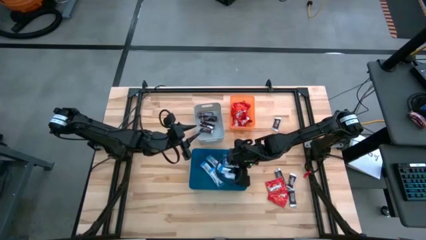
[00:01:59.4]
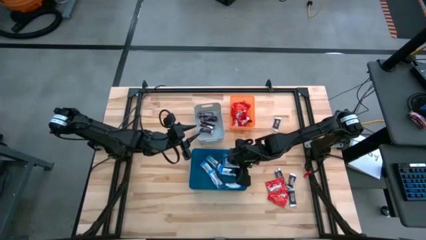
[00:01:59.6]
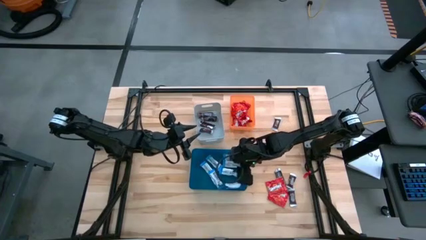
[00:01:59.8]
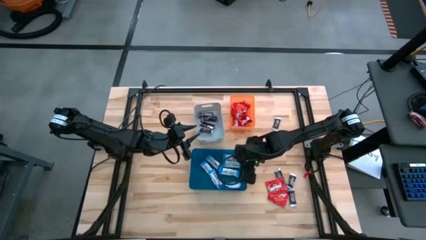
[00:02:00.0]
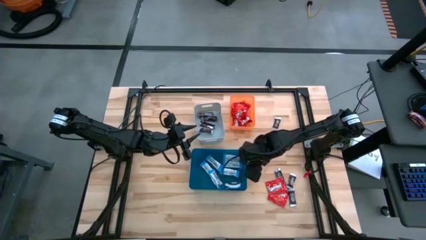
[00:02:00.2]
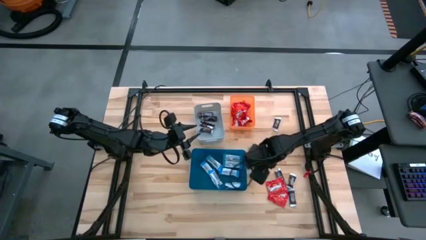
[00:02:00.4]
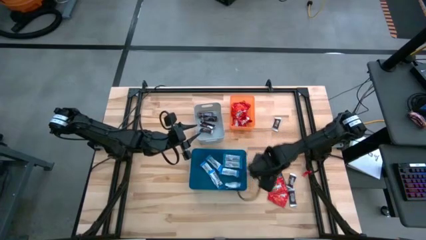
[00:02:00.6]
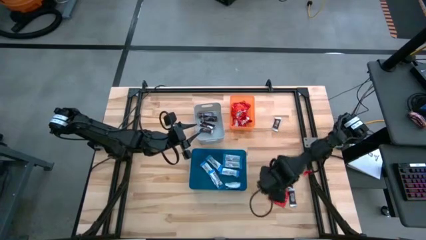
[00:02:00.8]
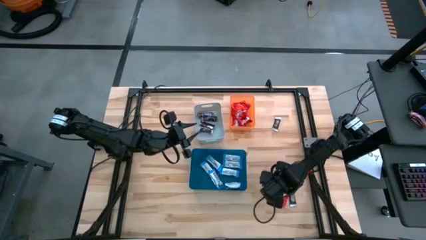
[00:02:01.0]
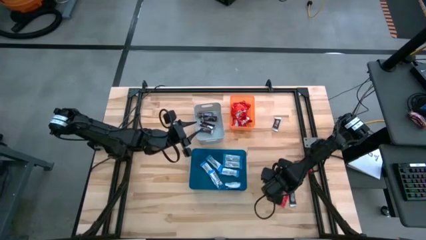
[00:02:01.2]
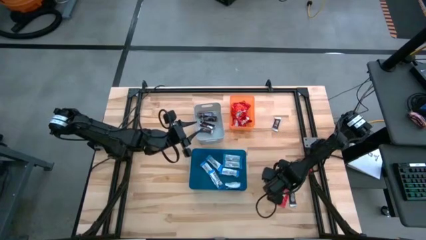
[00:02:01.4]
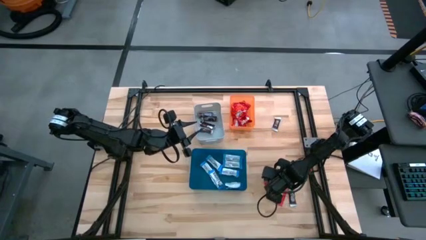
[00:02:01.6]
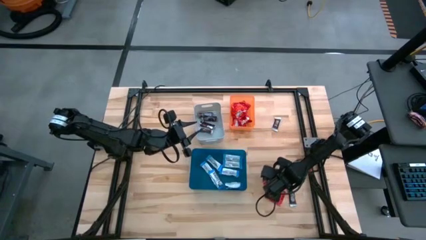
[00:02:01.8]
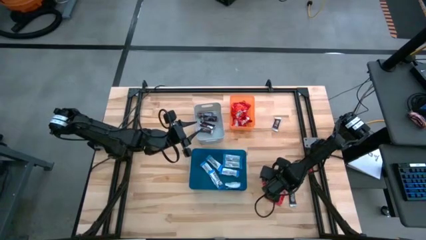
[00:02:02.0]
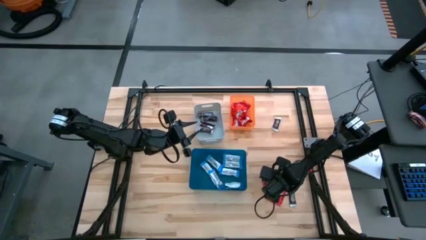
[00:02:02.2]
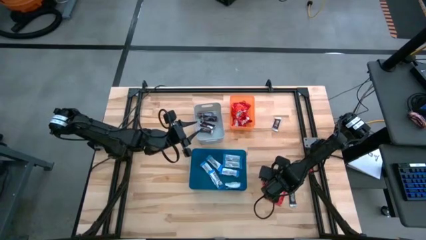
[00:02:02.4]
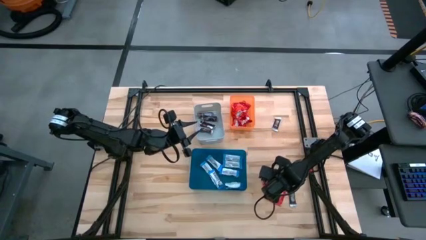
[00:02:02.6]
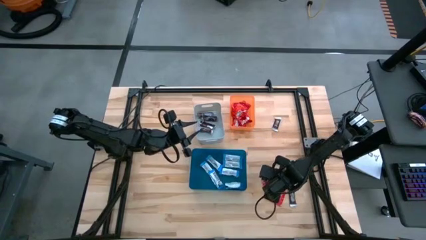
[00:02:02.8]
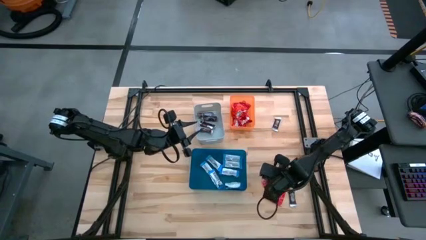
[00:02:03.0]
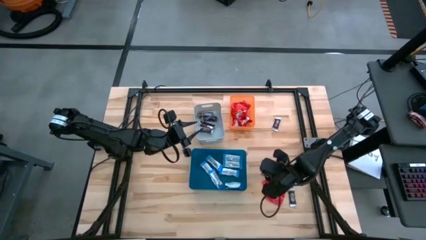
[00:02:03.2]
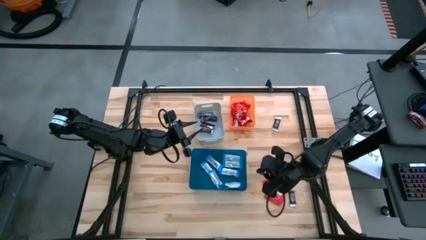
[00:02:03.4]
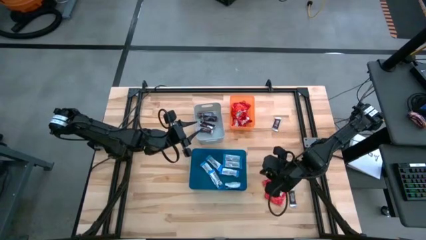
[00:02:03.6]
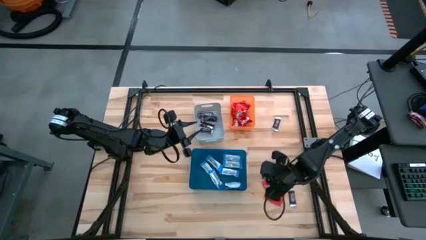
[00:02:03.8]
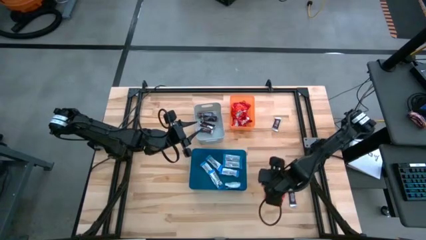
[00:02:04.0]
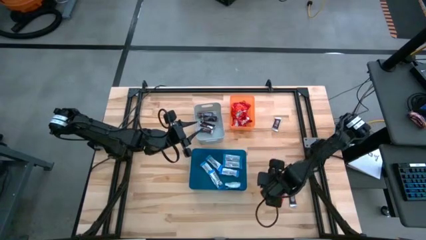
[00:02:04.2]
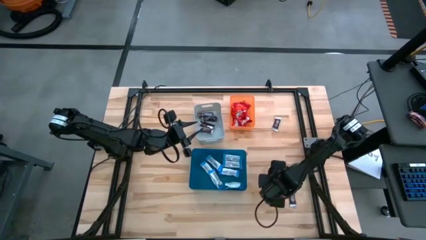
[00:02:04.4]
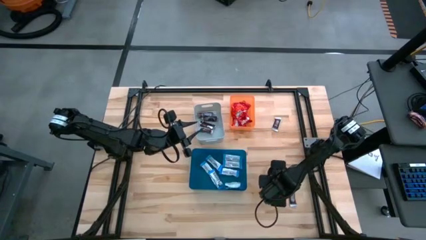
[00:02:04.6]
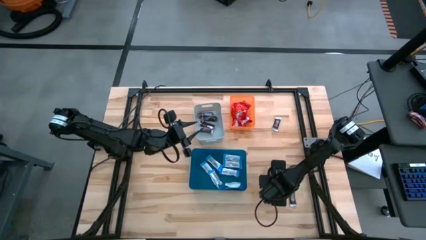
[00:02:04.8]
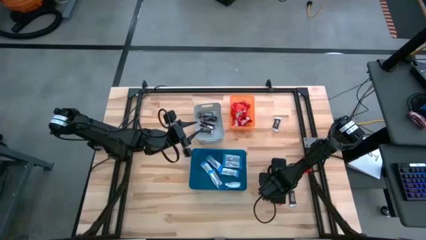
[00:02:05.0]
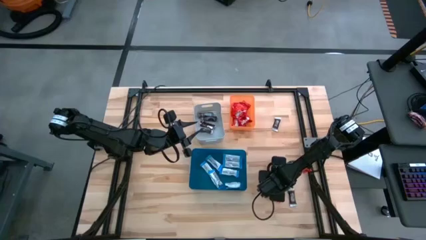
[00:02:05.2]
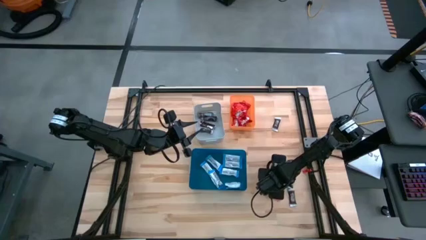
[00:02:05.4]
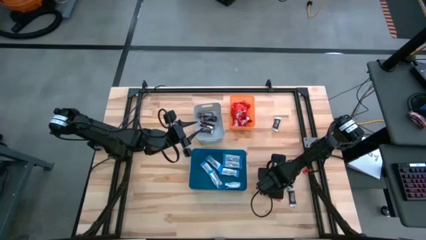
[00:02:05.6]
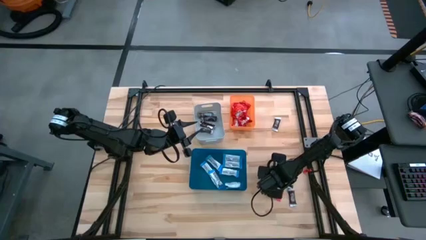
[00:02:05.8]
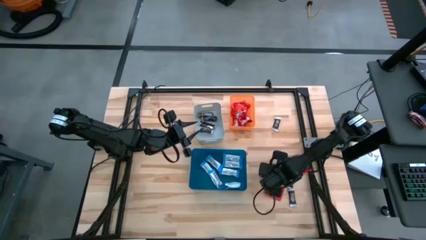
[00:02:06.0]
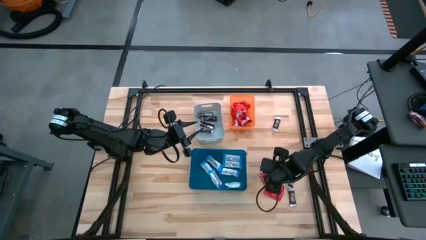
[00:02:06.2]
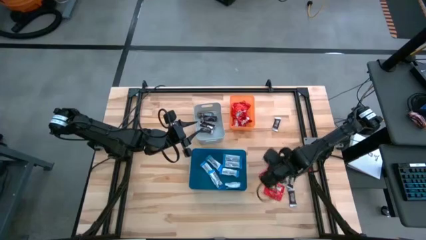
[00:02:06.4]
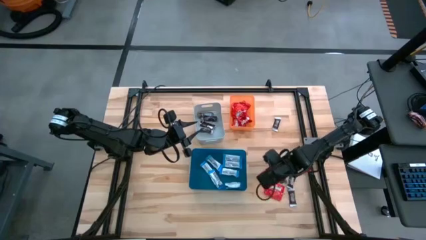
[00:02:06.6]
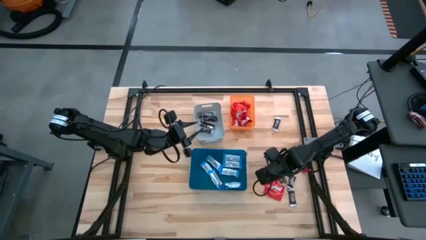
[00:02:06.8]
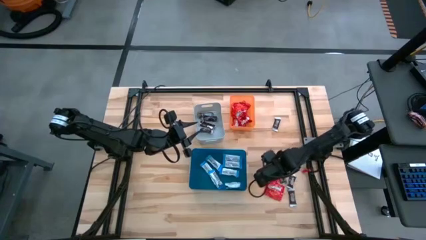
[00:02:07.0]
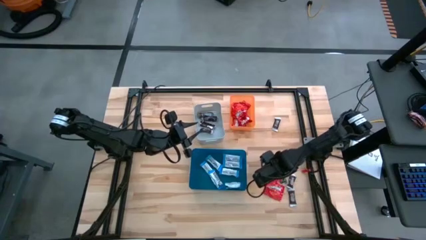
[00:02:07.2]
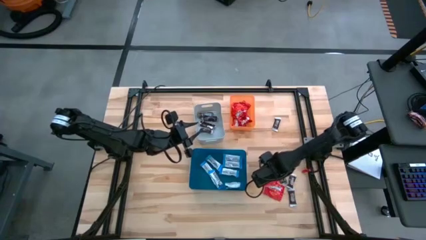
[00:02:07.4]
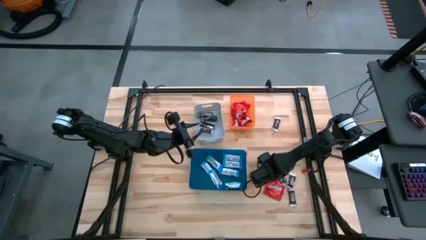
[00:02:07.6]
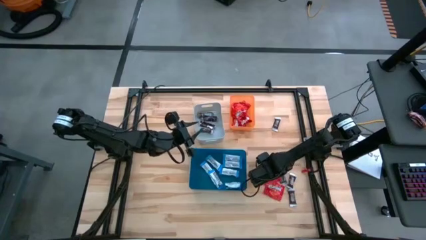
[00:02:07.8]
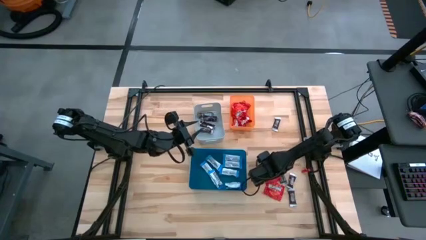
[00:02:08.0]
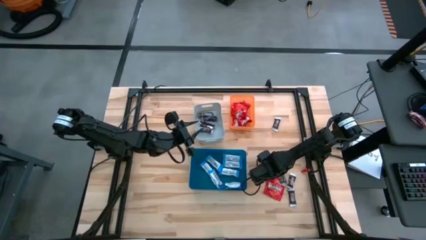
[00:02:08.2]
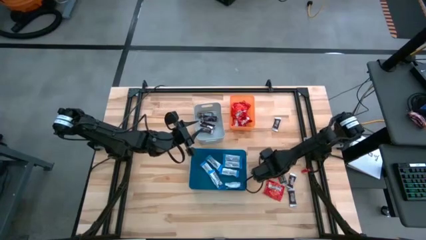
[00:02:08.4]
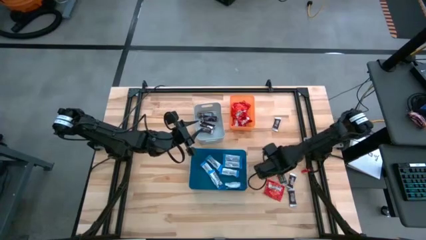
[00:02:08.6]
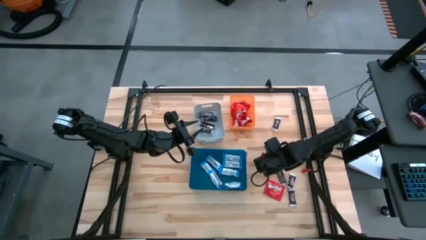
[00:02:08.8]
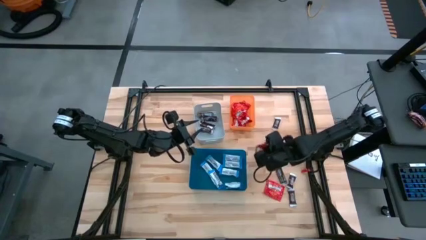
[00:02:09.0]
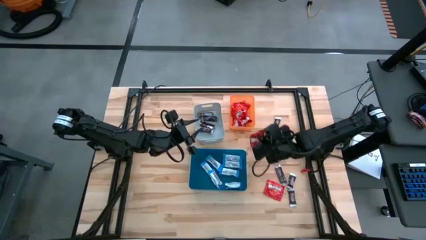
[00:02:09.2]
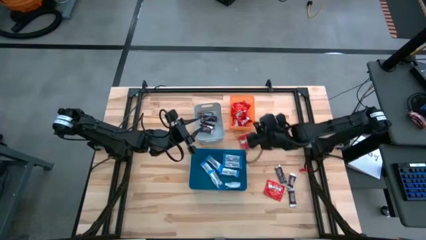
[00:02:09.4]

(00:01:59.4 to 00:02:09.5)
Task: Sort candy
Put the red chocolate into the orange bin

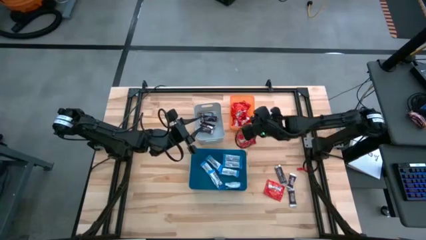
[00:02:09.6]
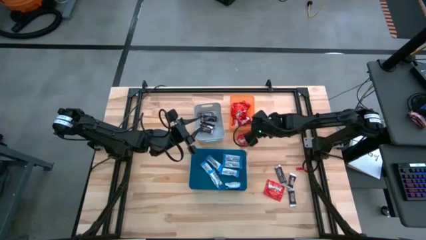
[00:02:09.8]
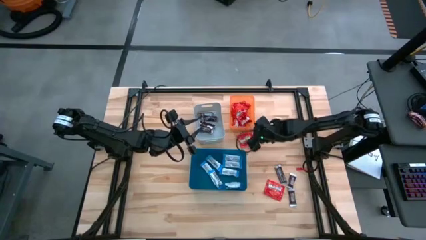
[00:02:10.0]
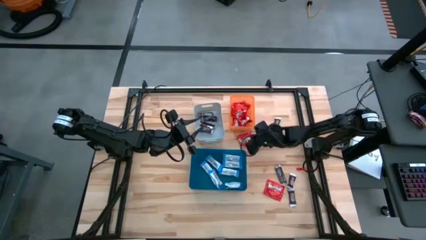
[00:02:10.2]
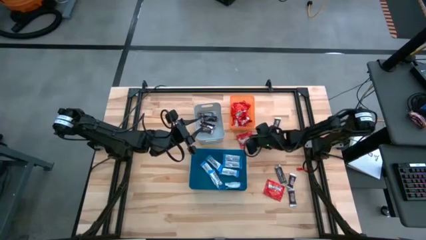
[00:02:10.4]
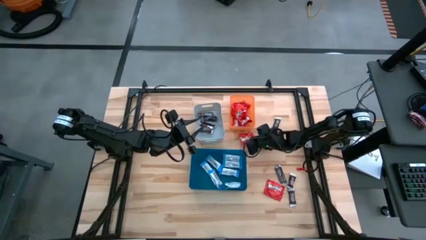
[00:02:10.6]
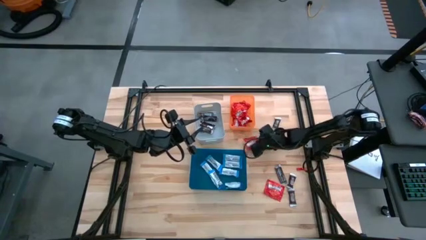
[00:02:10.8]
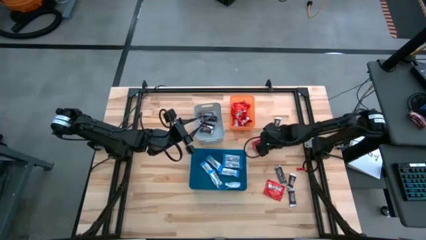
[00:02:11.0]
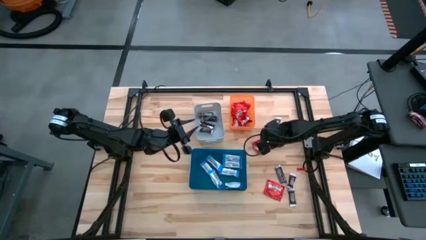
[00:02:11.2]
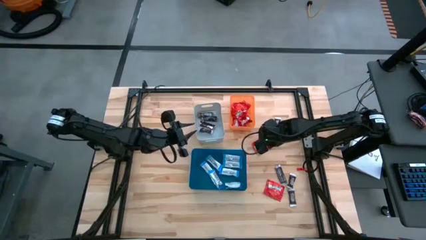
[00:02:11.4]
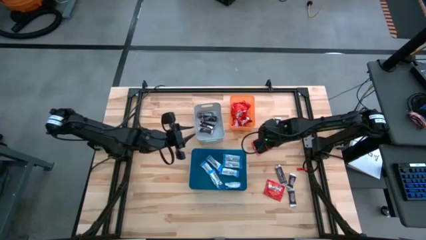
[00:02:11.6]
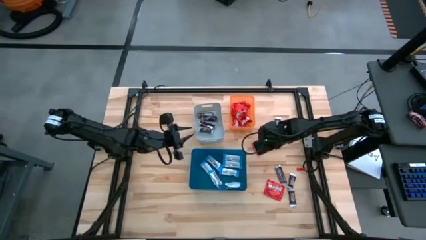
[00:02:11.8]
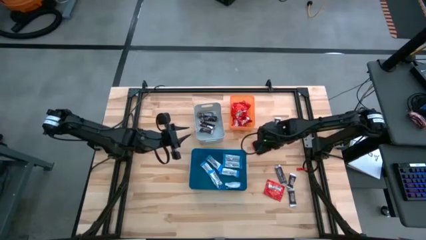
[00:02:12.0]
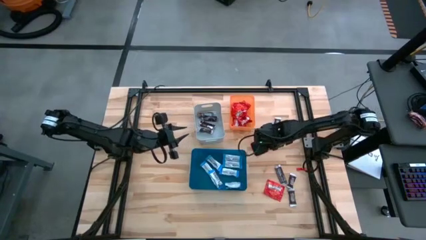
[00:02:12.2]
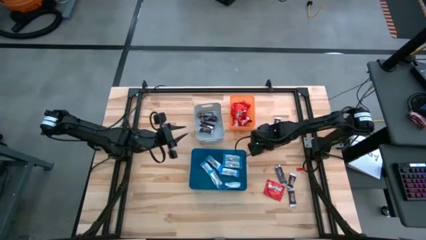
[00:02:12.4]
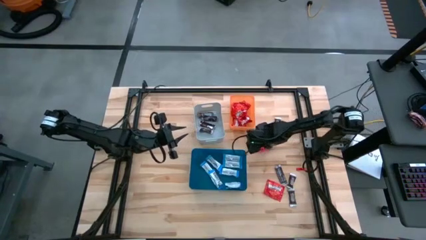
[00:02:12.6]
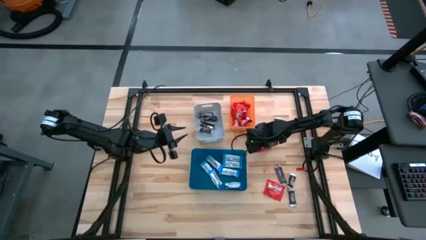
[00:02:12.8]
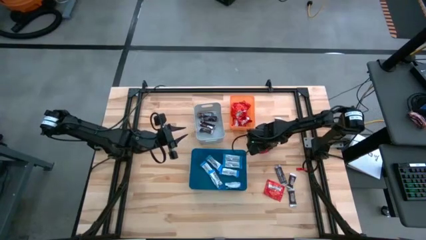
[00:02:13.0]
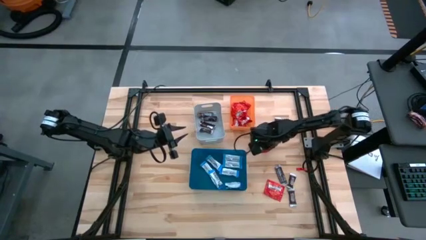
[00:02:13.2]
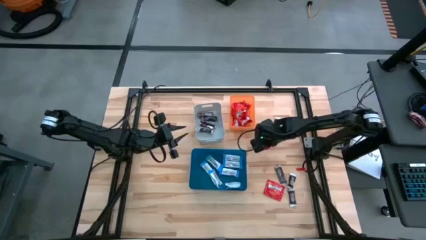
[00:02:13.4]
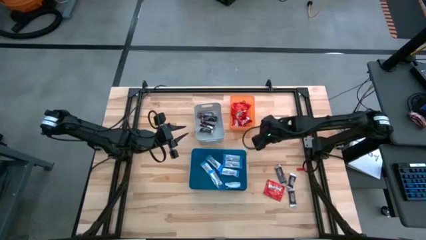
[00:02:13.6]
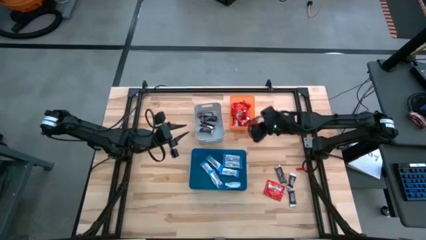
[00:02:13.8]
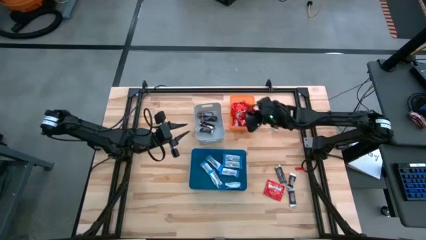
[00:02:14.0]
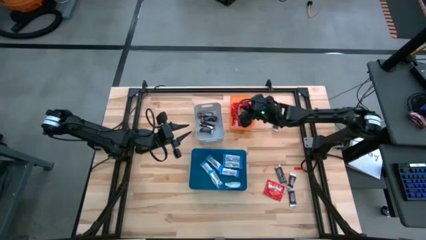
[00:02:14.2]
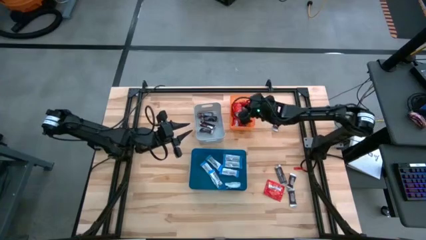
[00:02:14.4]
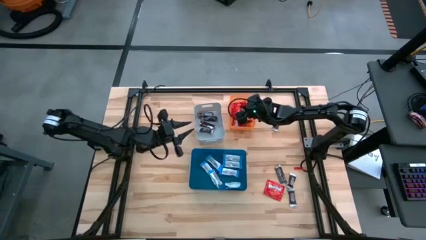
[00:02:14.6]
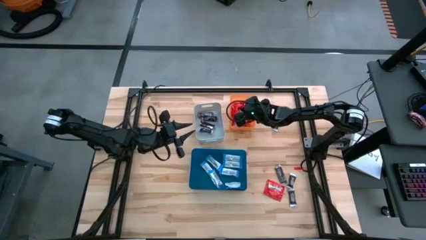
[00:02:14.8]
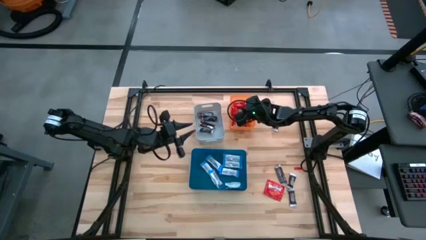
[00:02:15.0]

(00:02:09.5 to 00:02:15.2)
Put the red chocolate into the orange bin
